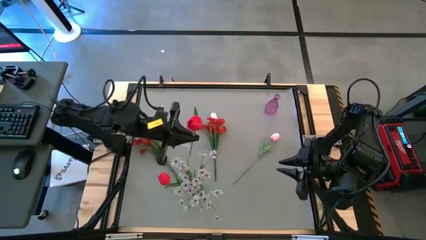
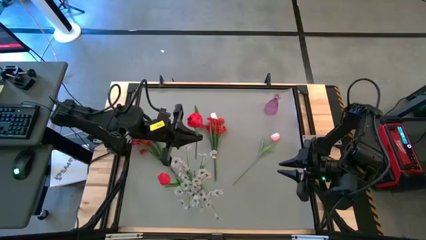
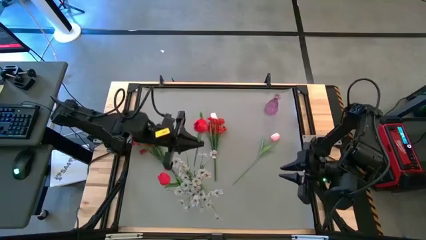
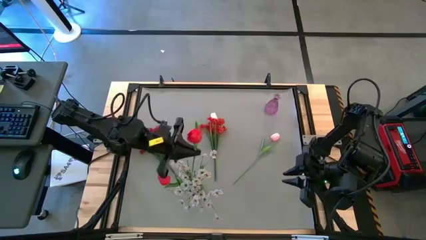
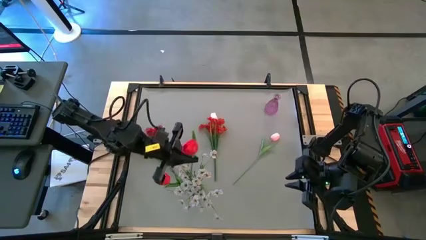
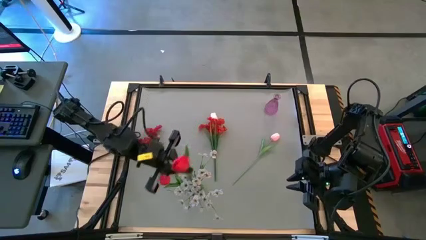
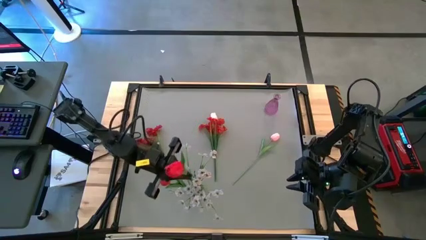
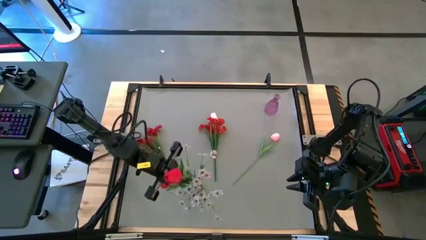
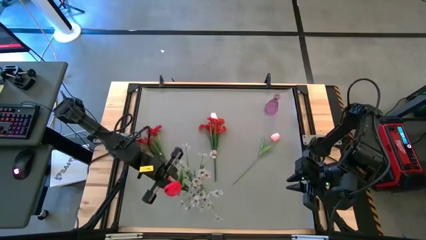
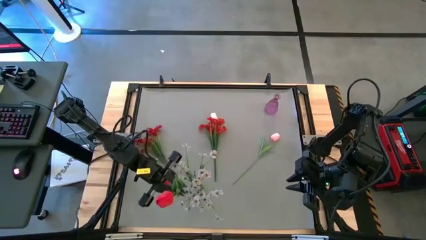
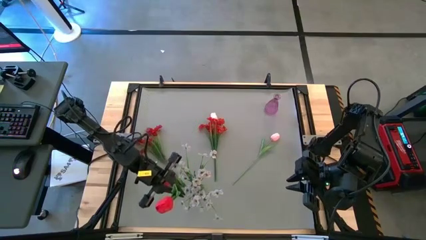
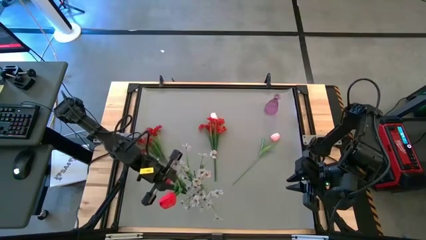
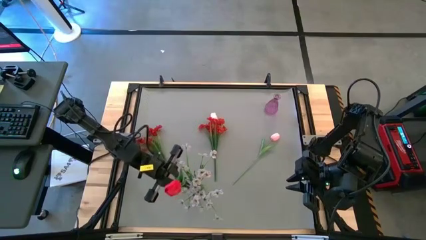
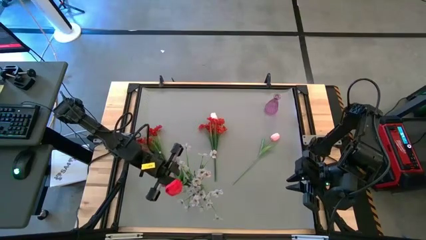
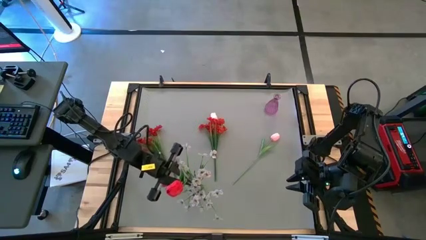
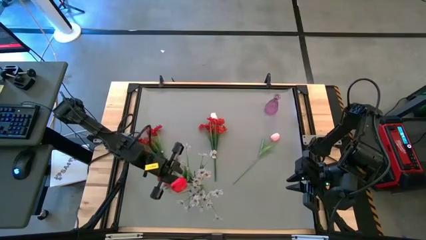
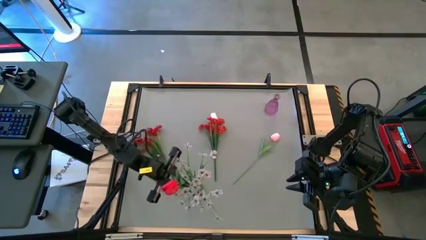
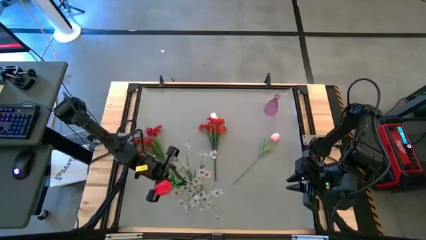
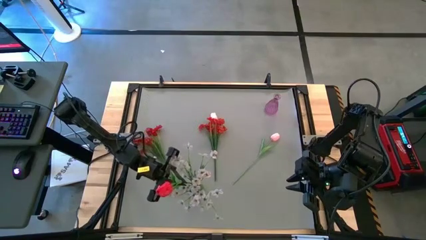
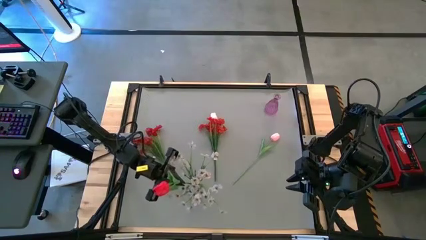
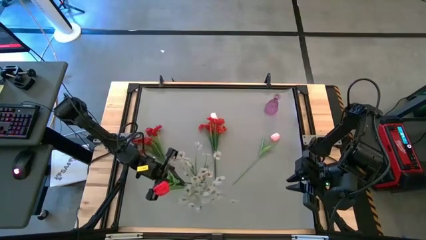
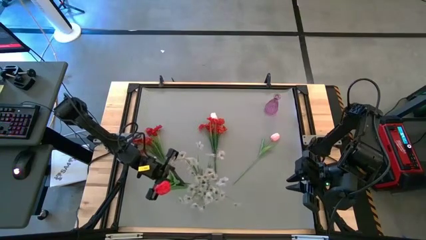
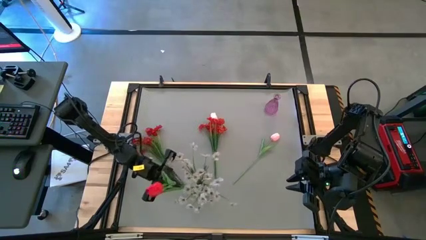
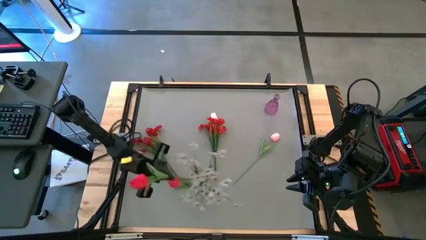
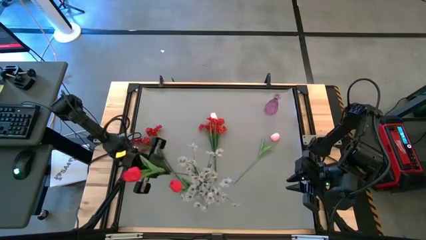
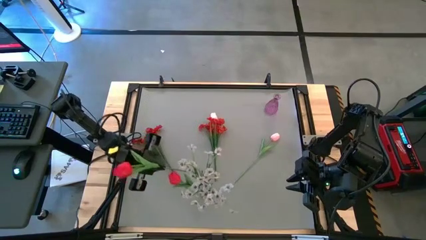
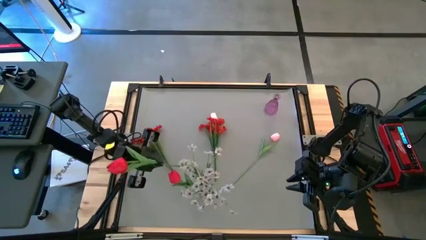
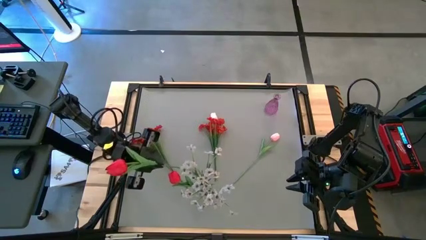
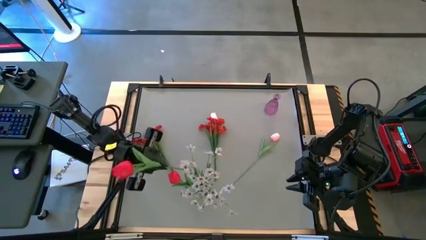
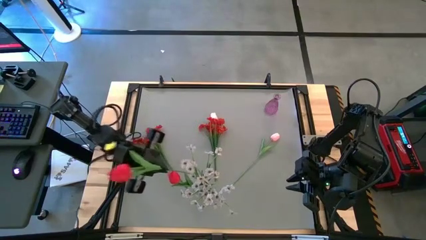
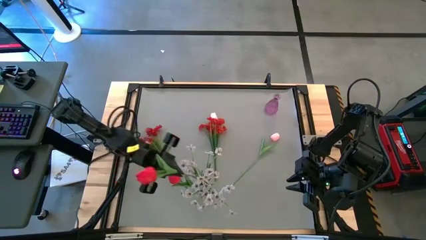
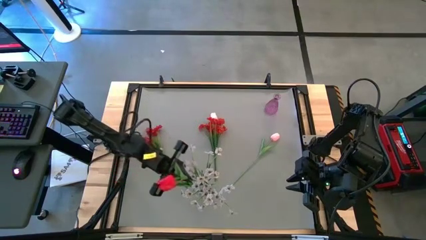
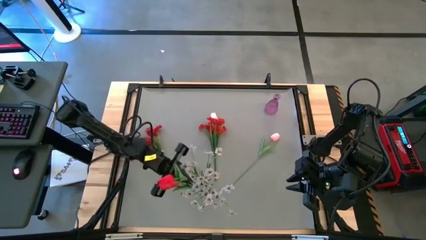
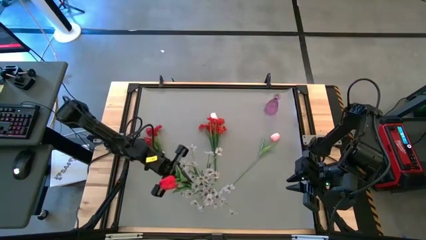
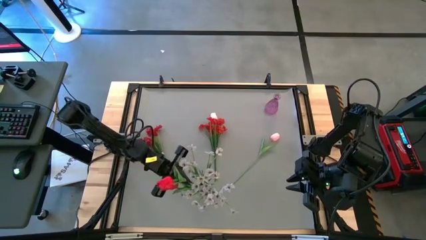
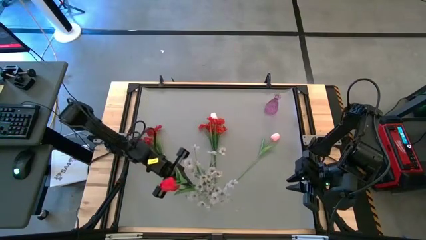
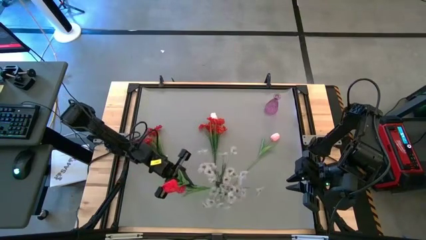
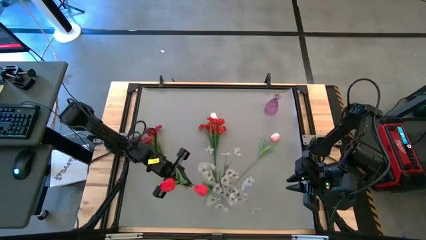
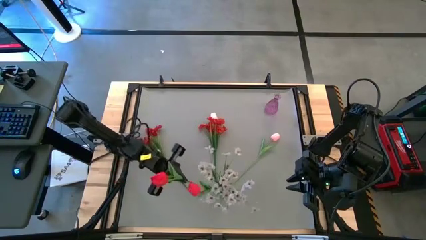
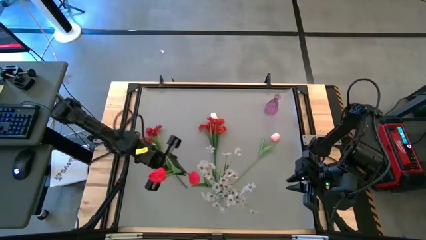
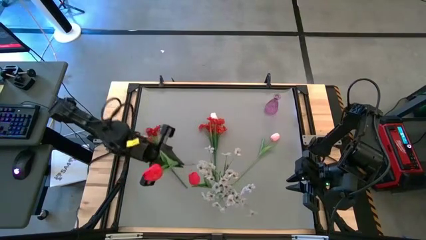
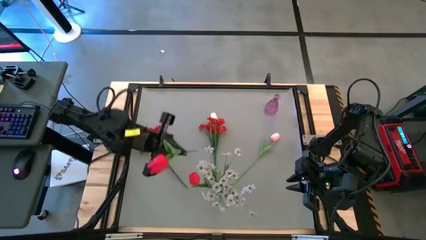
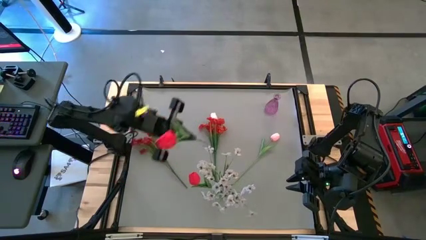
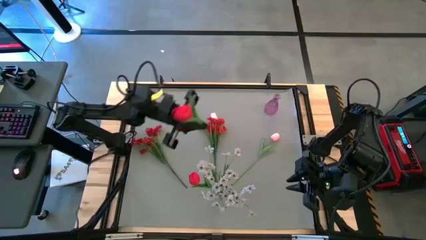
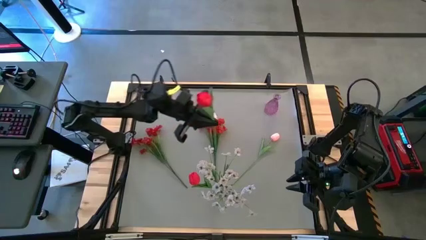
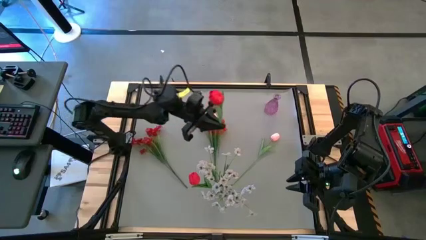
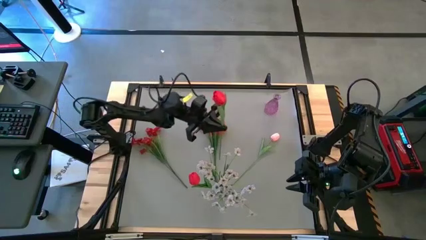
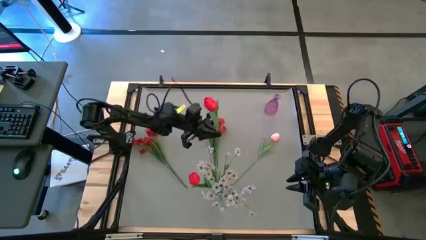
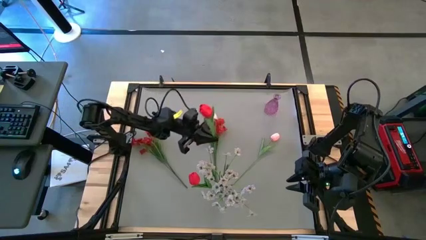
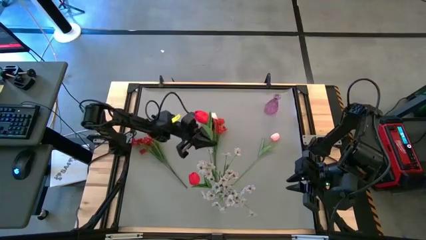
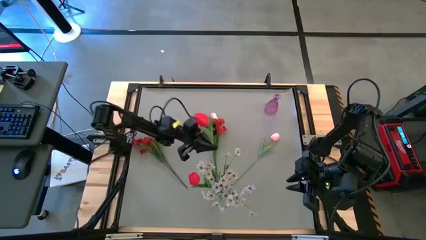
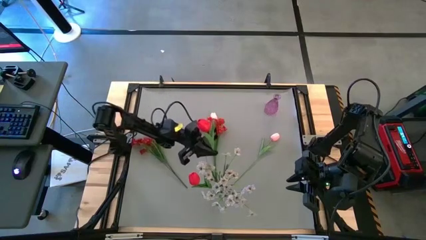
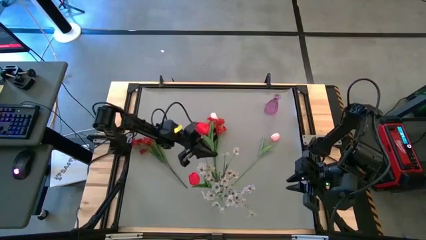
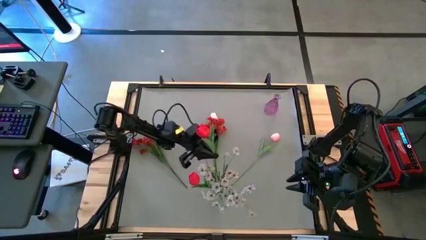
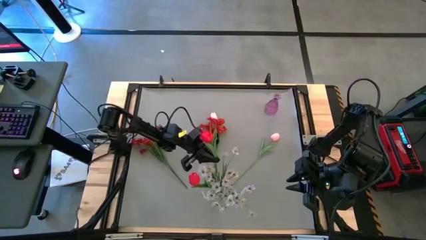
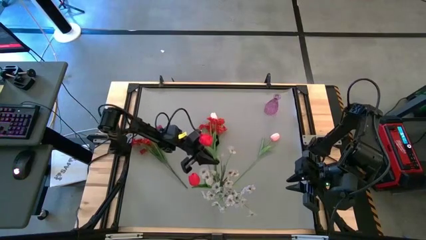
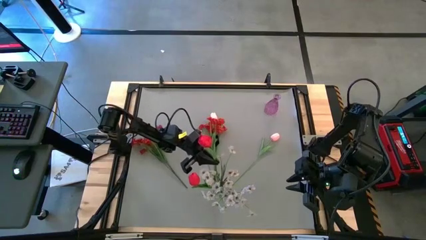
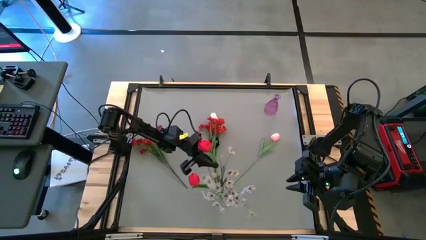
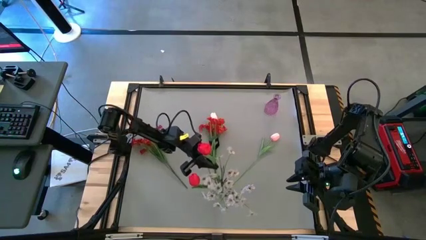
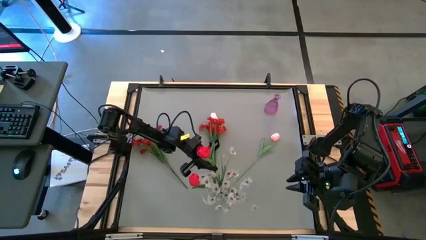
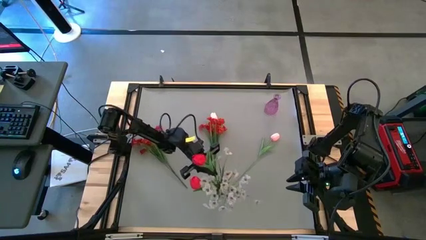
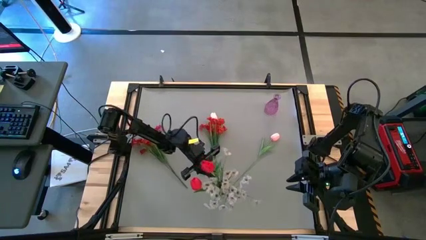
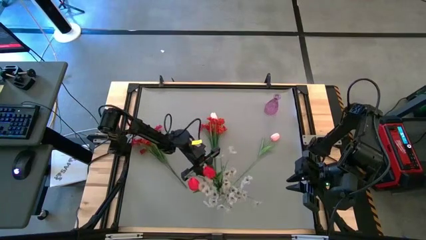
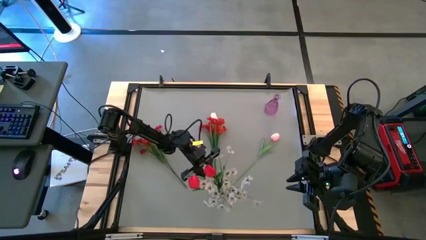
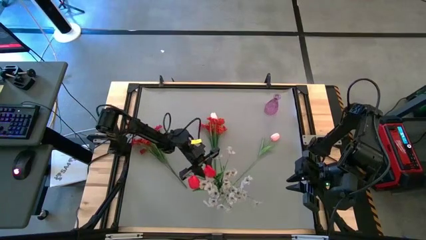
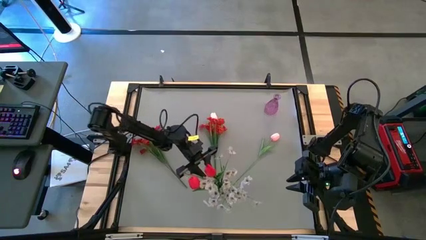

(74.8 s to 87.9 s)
Task: Sort flowers into vase by color
Put the red flower into the green vase
